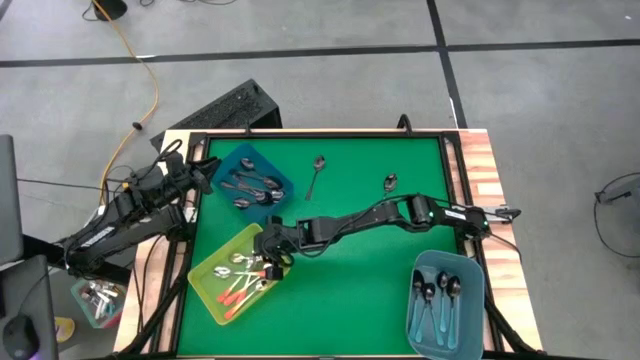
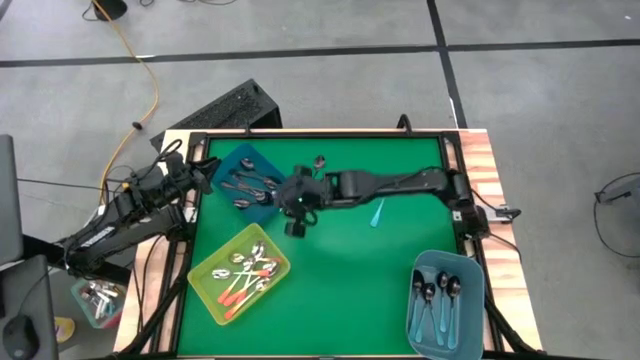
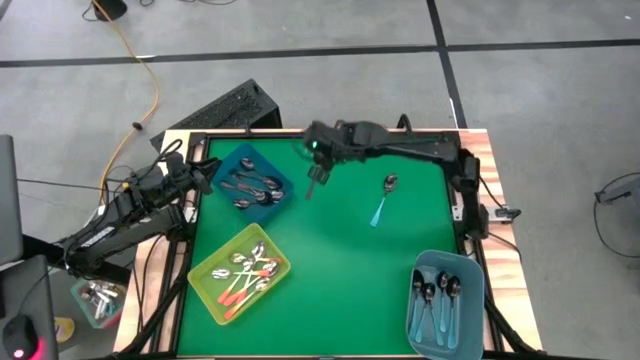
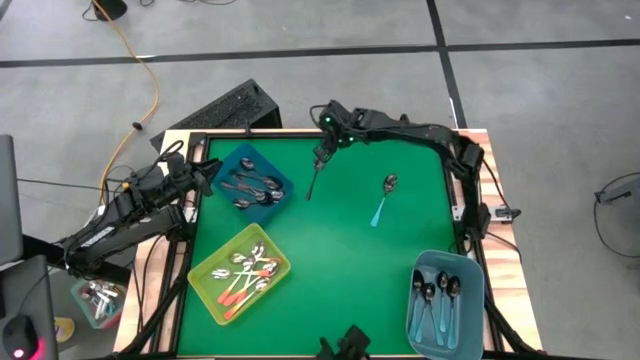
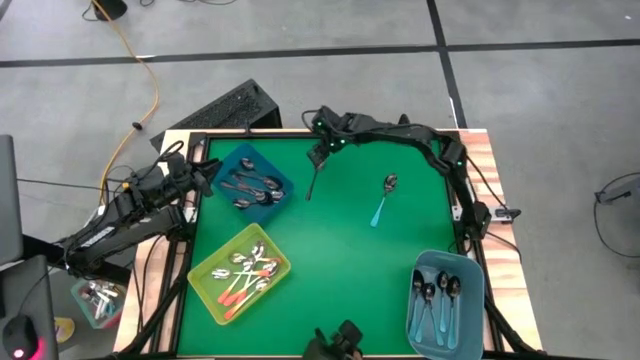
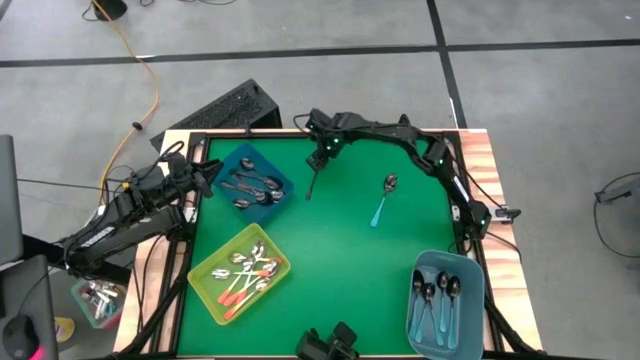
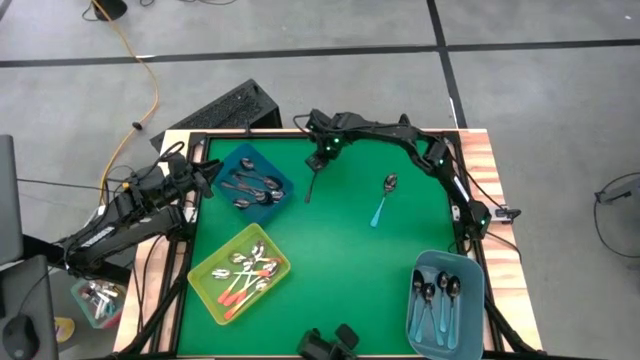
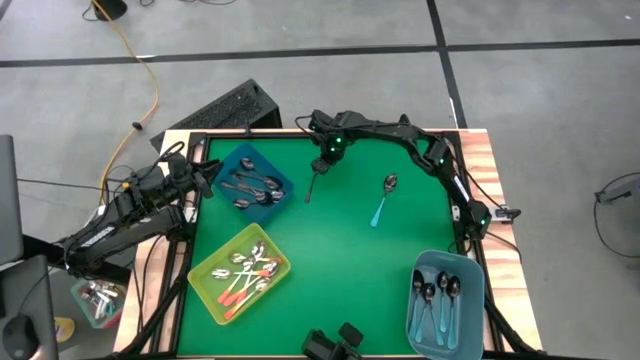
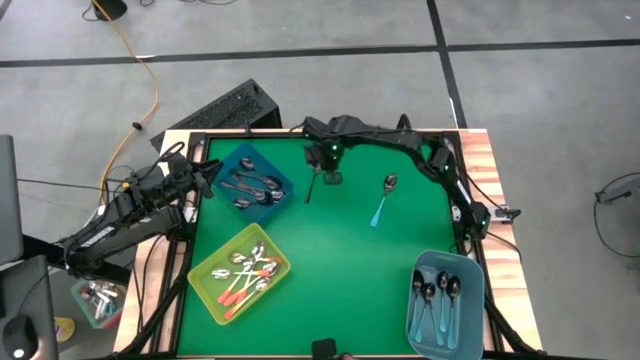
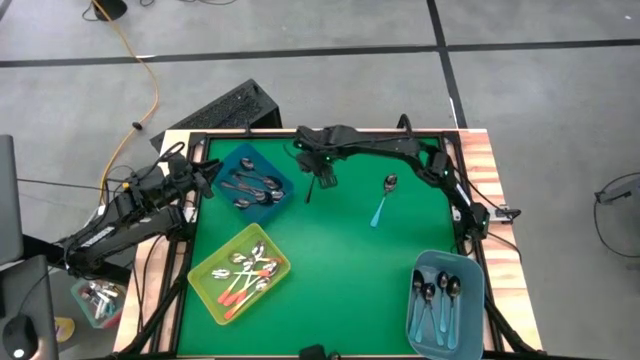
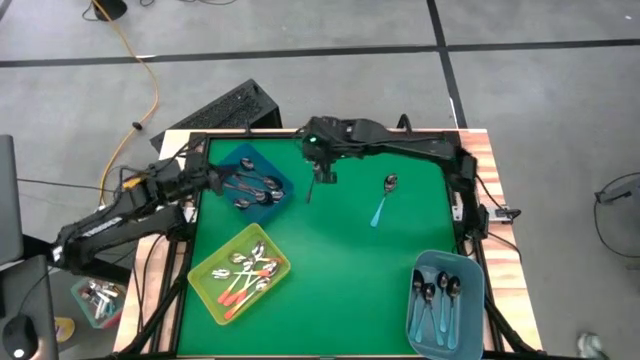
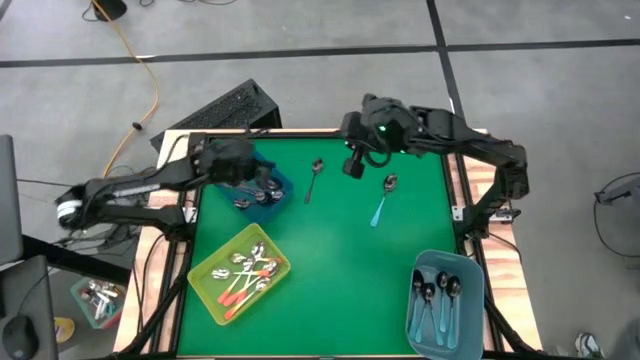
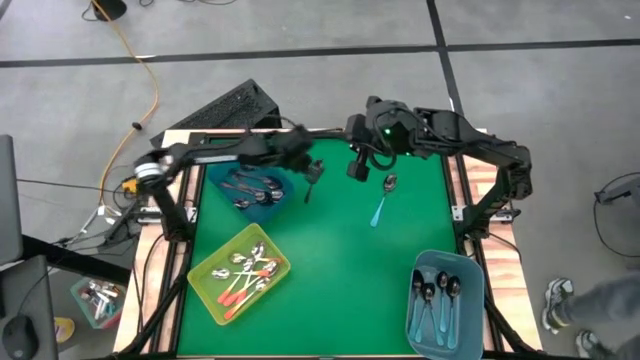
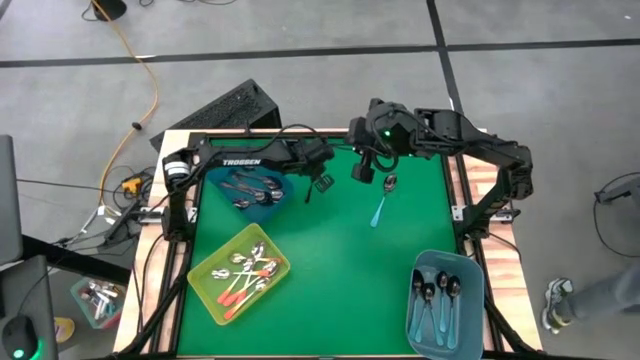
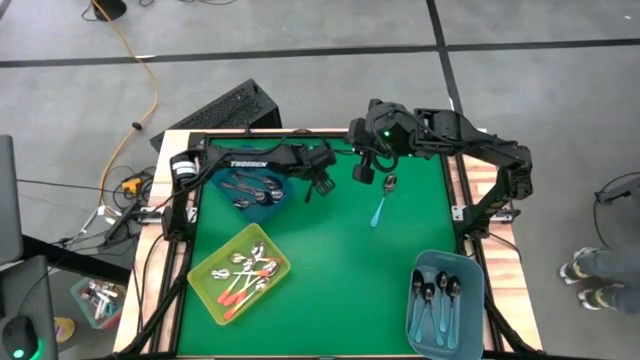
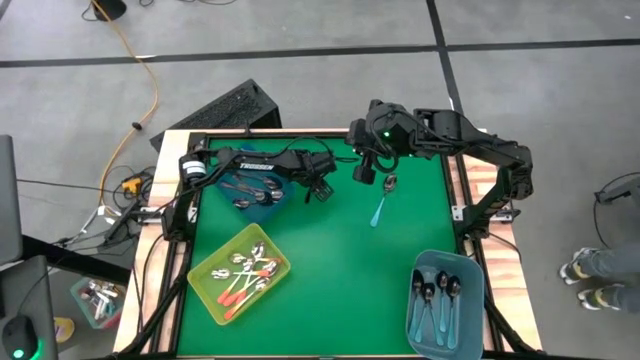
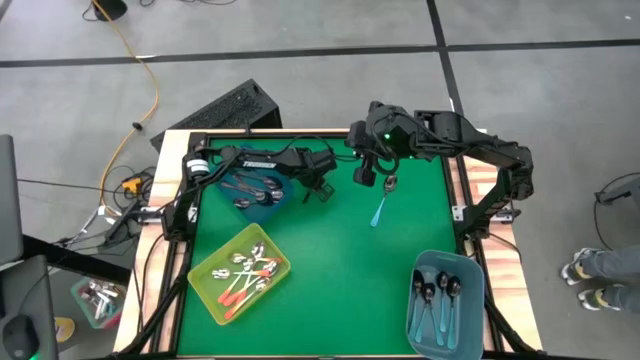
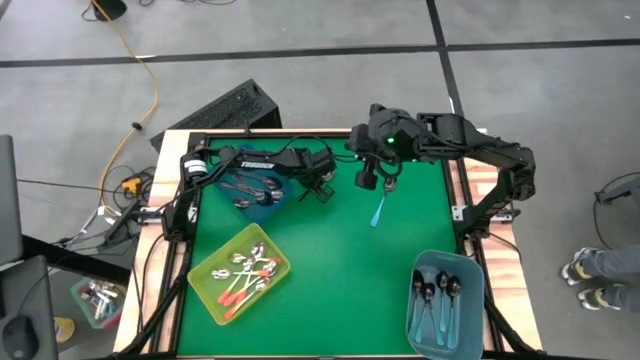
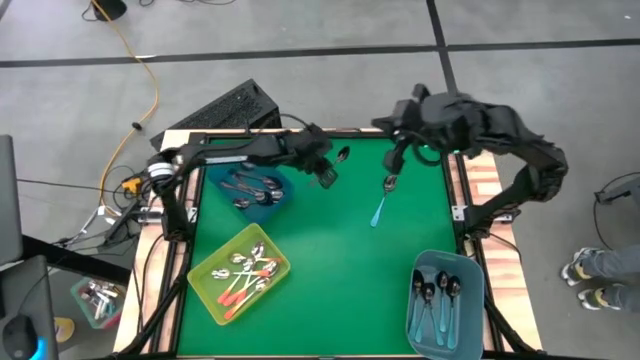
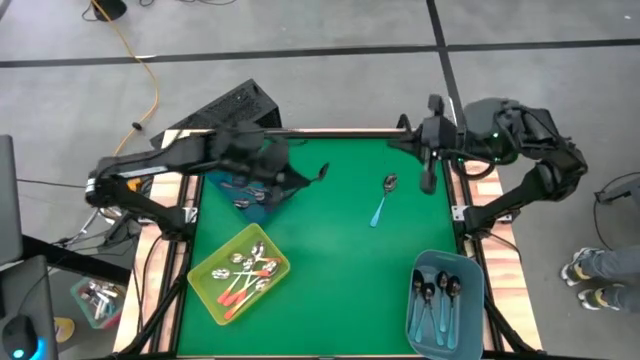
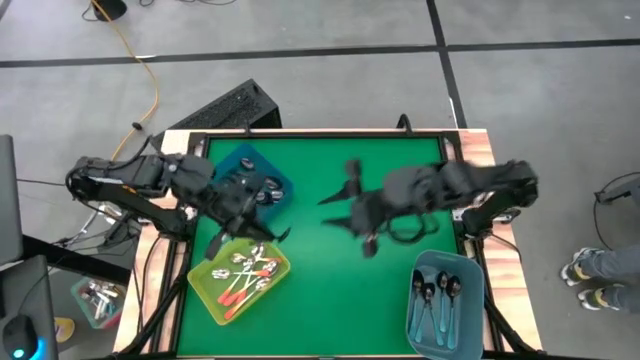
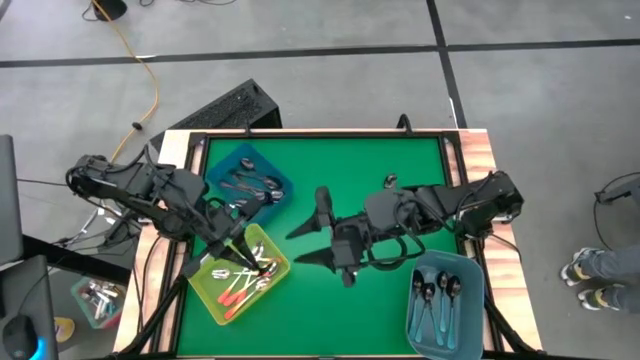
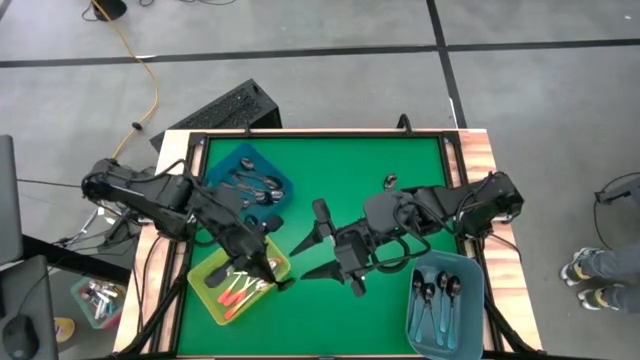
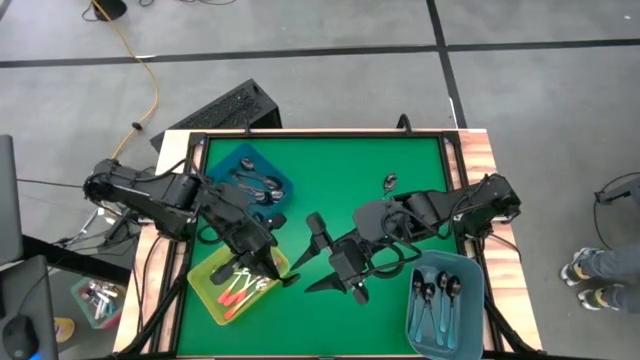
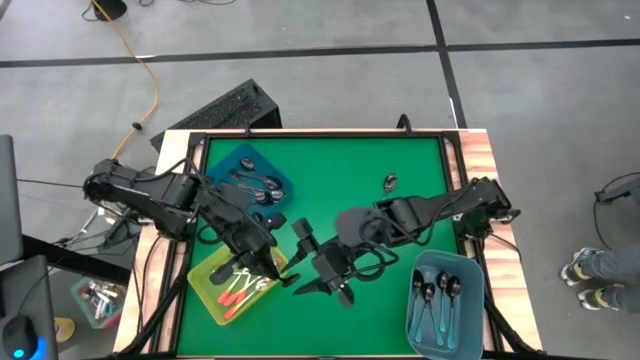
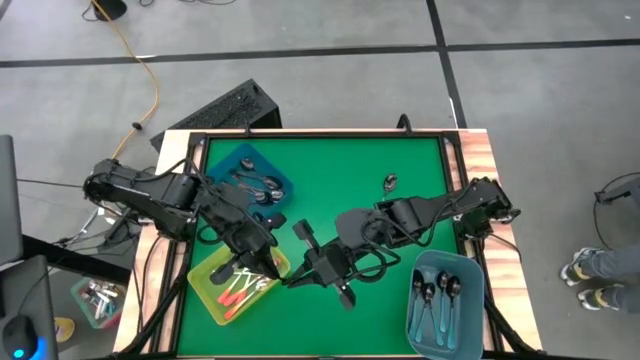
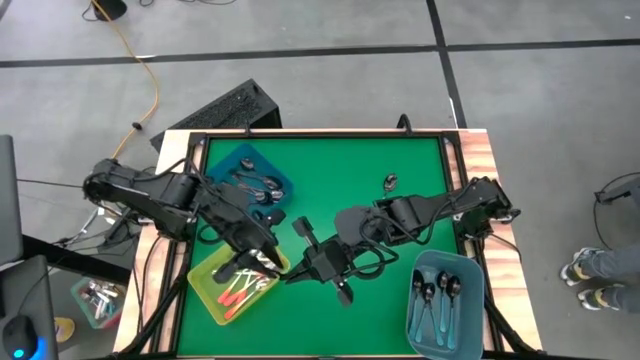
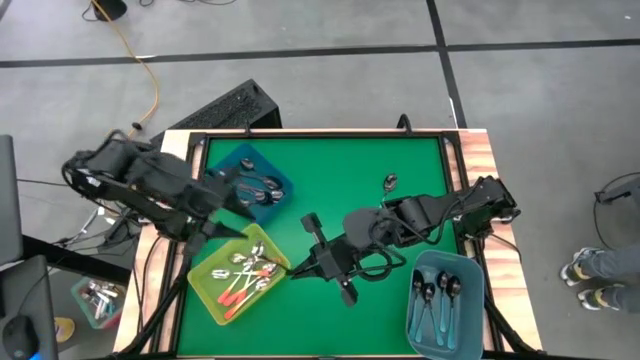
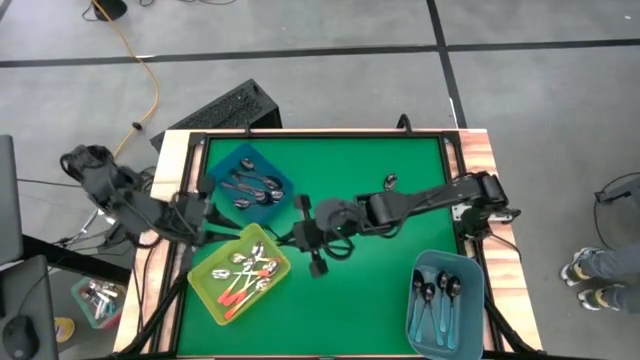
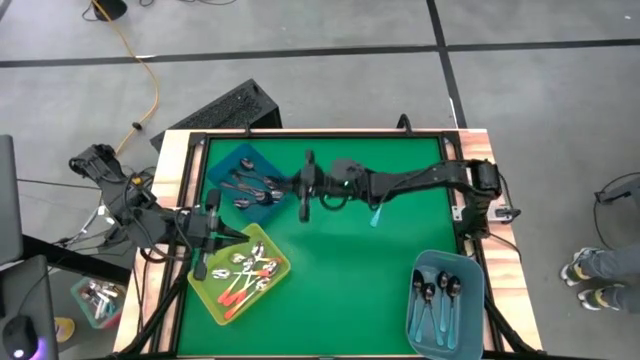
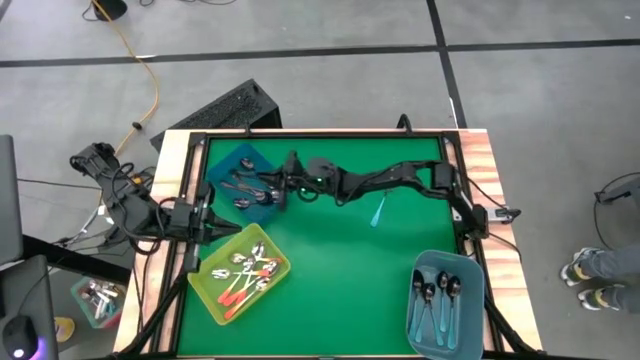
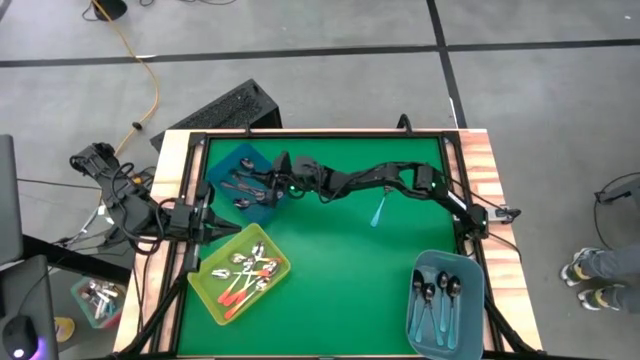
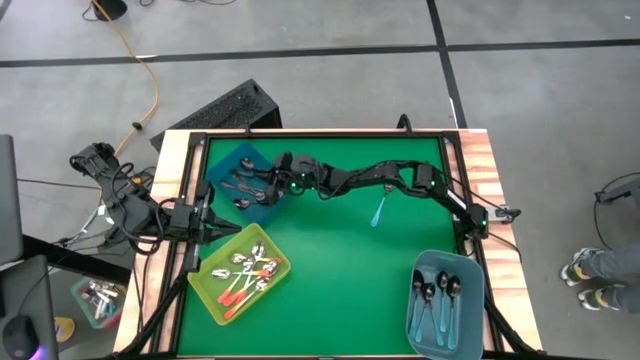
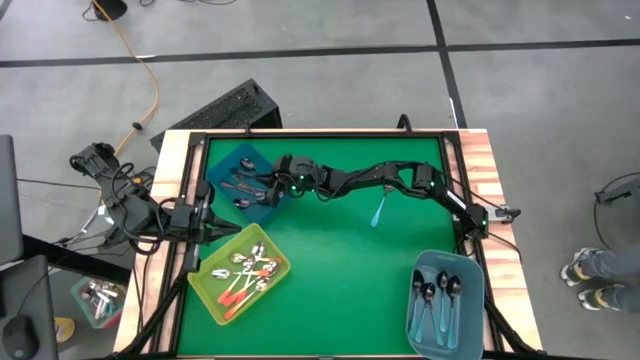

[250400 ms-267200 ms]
Task: Sort silverware by color (type)
Put the black spoon into the dark blue bin

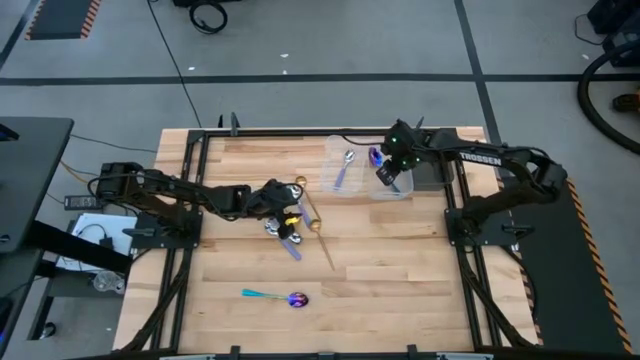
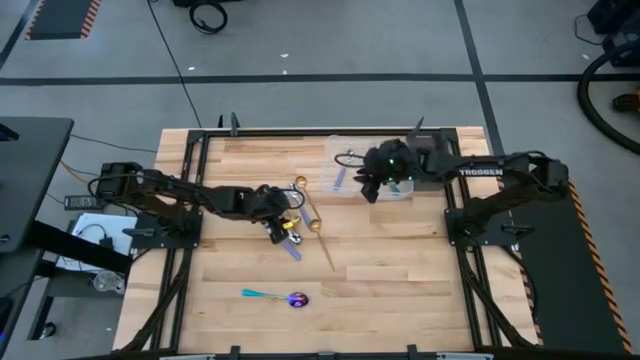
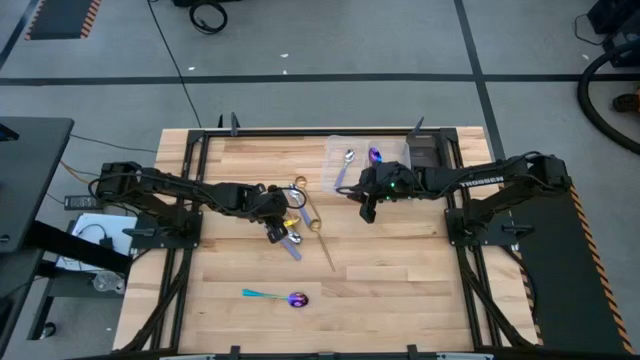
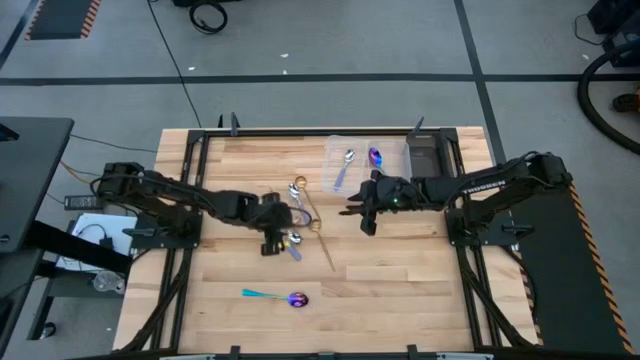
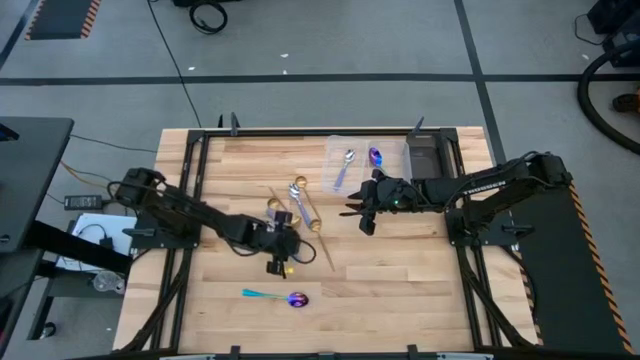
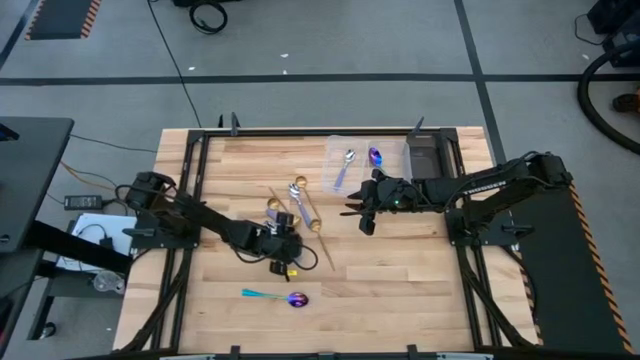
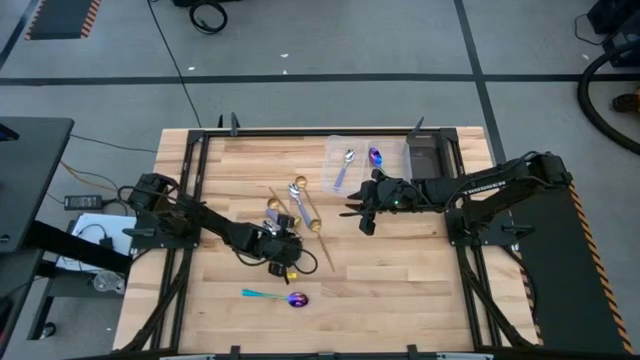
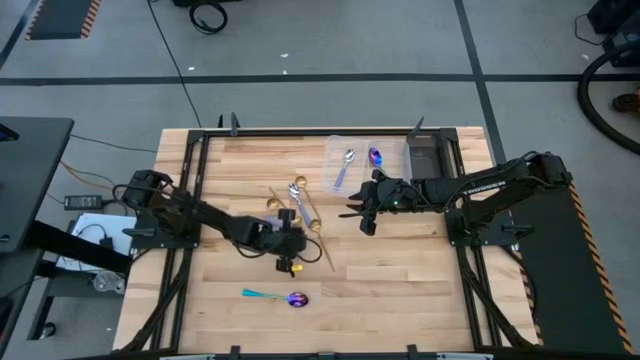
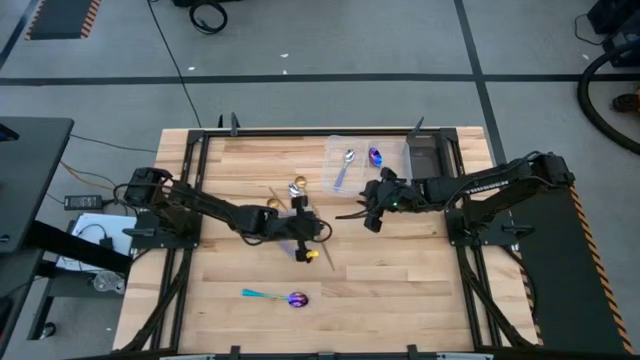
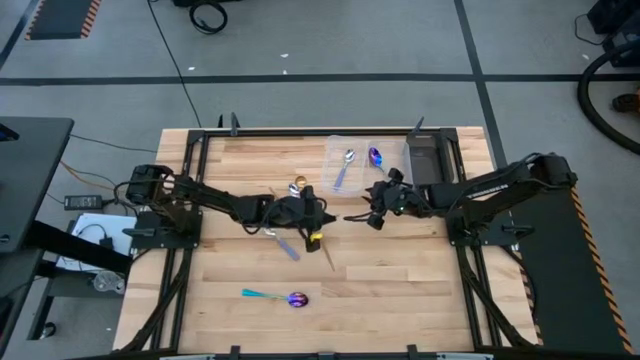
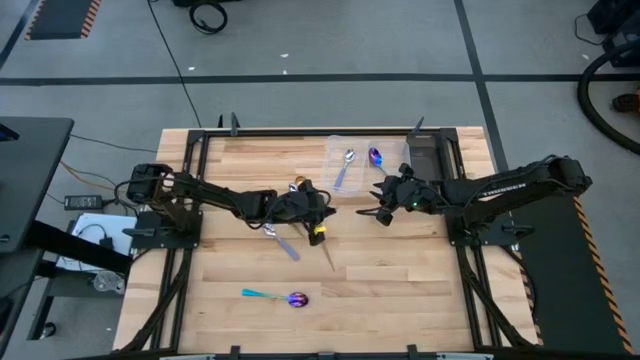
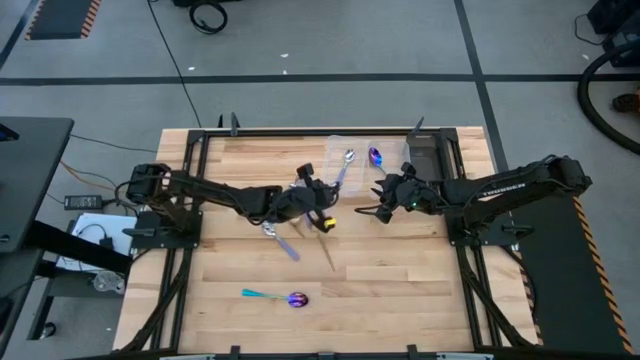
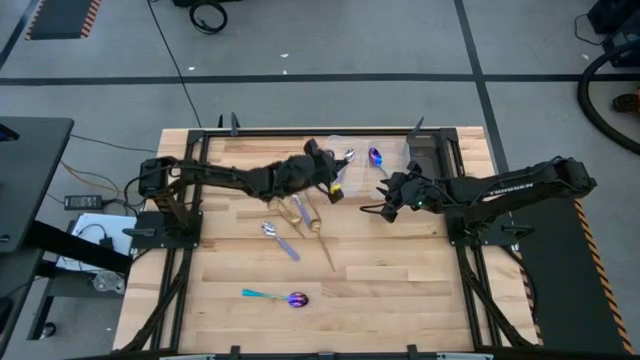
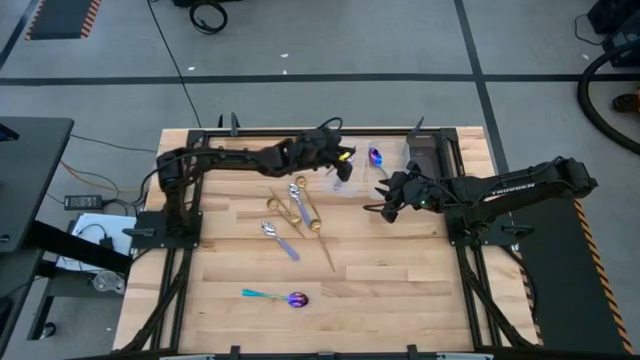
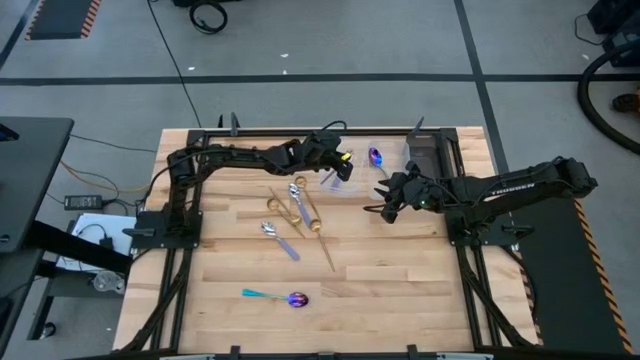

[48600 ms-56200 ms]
Task: Sort silverware by color (type)
Put the middle gray spoon into the left transparent bin
